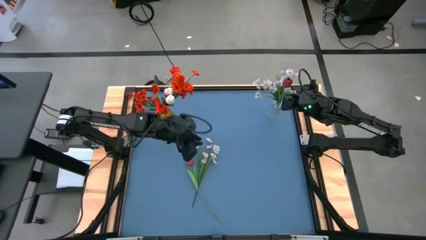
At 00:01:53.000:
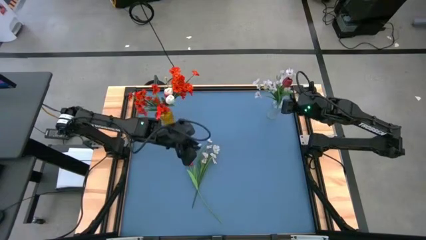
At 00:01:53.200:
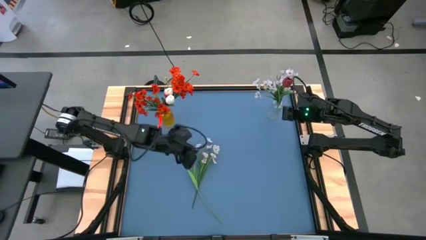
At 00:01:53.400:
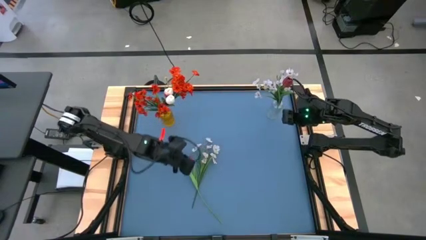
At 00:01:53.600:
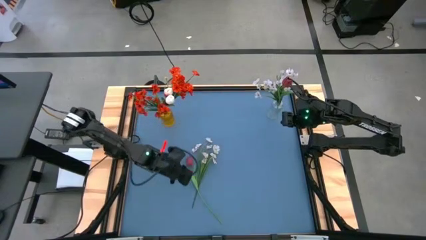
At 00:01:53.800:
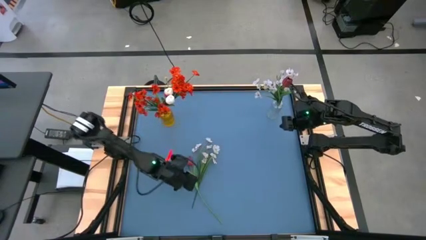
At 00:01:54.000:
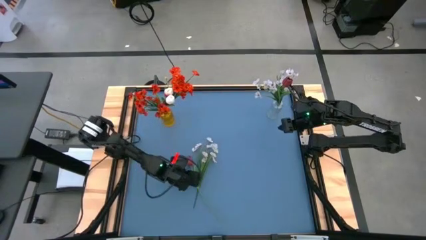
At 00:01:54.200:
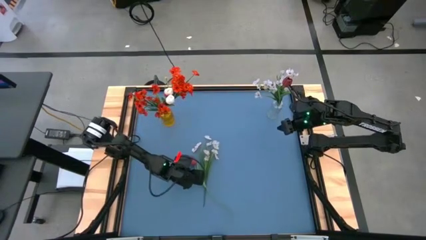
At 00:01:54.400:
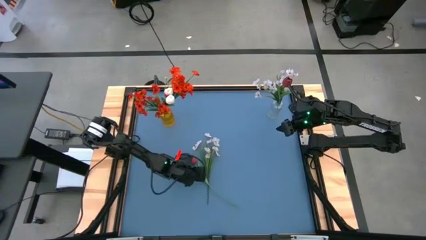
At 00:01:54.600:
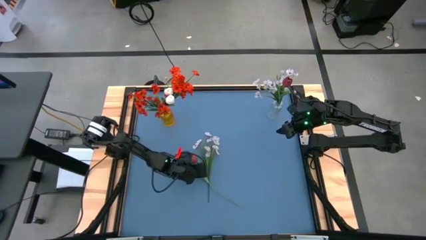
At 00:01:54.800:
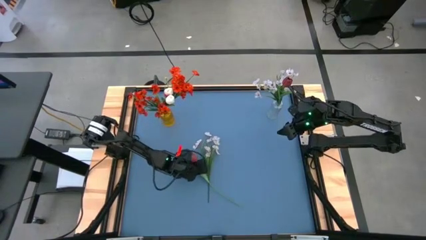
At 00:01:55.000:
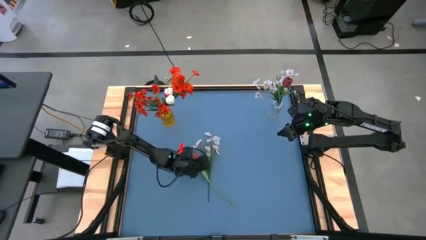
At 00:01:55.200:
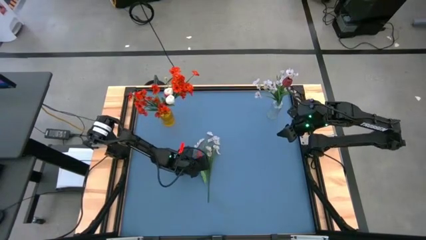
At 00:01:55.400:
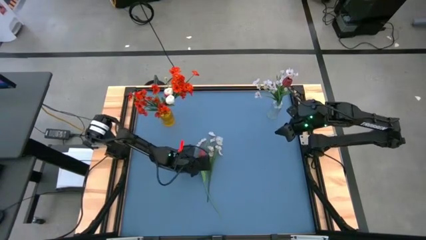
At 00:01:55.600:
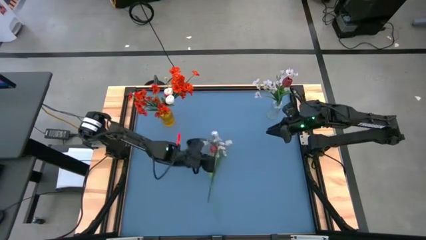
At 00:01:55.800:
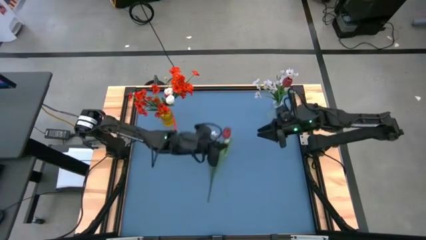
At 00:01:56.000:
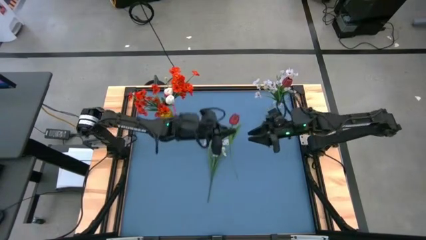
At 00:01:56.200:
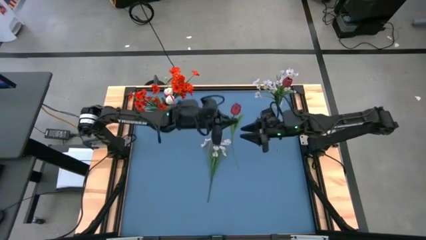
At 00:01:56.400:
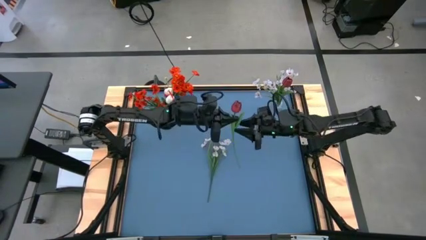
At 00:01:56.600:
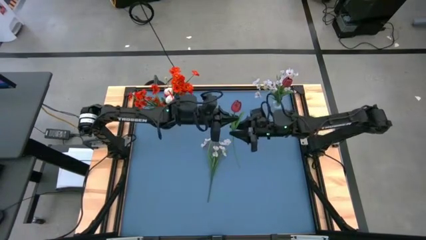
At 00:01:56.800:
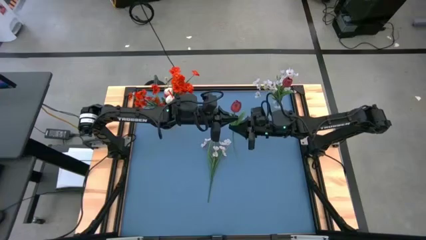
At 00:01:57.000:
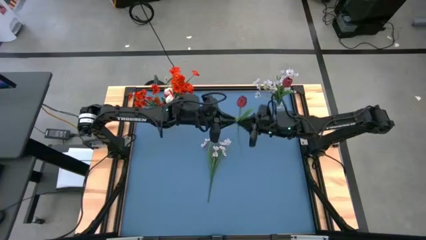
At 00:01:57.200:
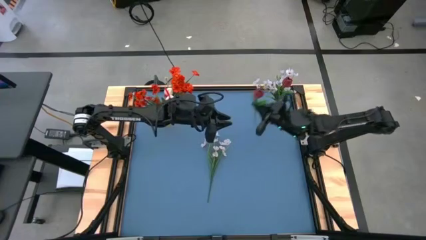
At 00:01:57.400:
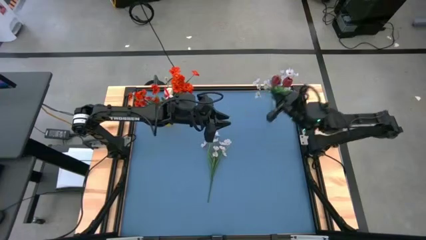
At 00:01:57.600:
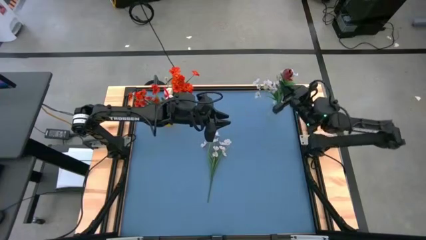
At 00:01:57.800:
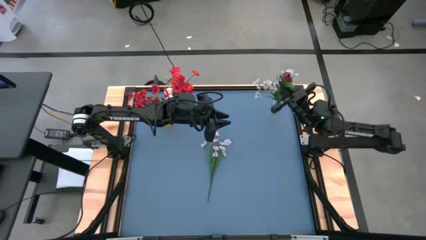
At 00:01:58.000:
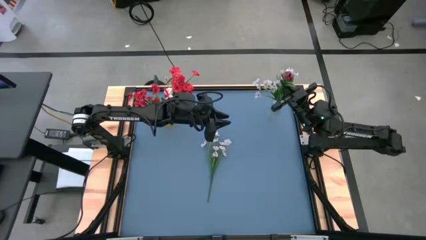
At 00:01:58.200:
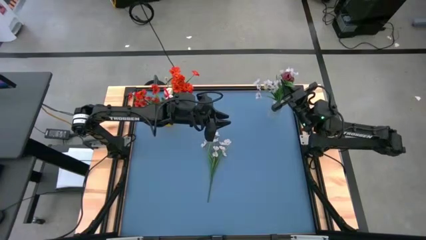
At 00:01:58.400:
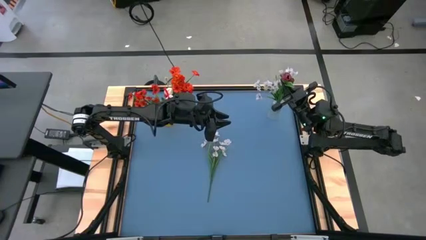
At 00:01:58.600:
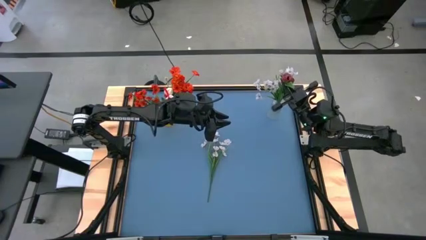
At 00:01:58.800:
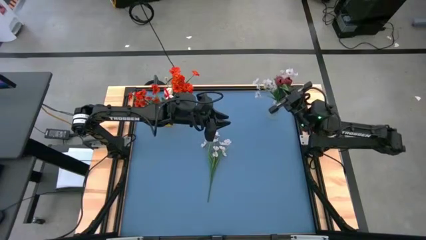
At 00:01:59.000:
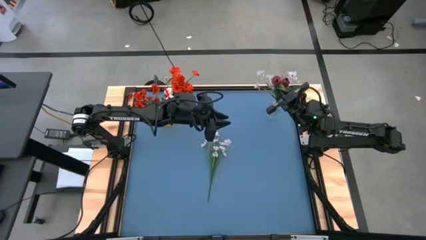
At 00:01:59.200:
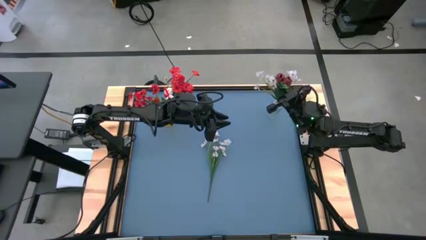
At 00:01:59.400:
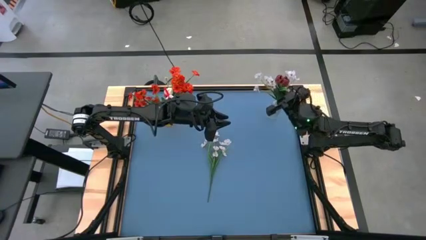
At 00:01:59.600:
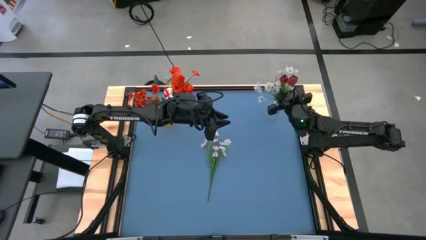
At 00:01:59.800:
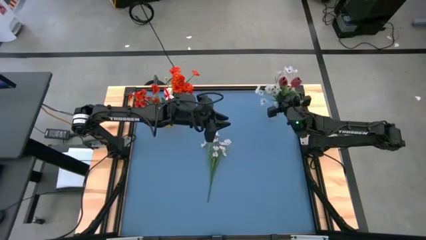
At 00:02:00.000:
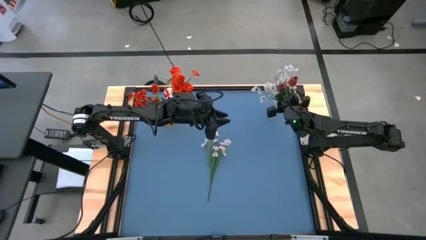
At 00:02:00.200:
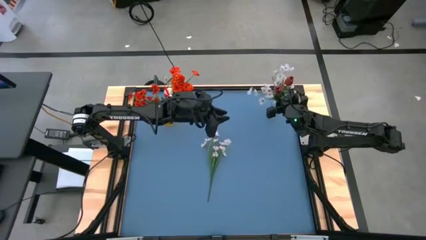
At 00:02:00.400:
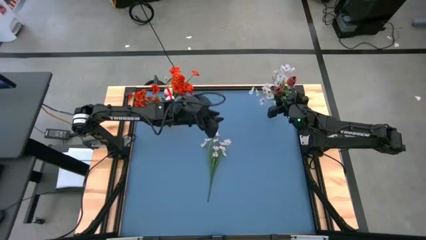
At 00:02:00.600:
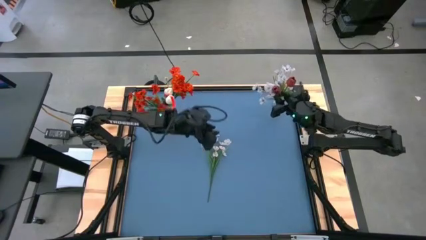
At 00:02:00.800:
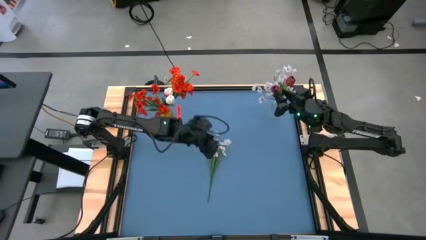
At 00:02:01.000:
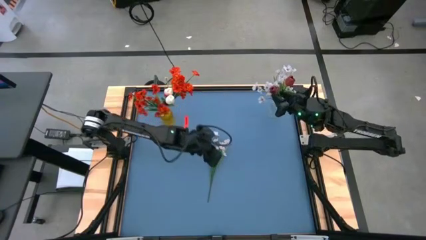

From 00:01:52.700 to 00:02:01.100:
Task: Sort flowers into vase by color
Put the red flowers into the transparent flower vase

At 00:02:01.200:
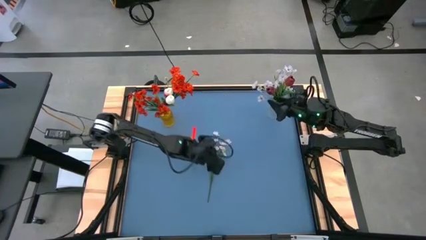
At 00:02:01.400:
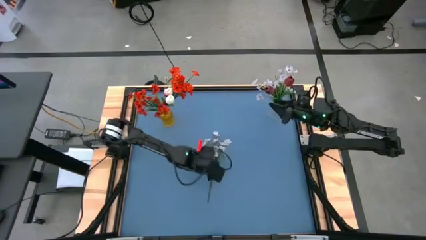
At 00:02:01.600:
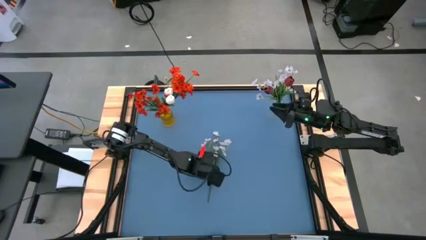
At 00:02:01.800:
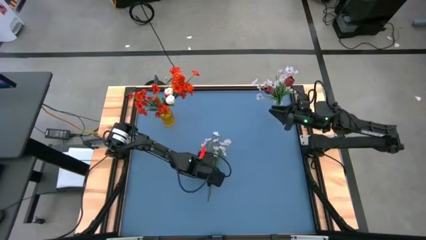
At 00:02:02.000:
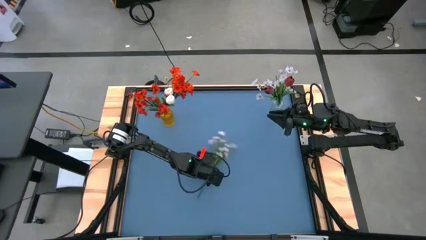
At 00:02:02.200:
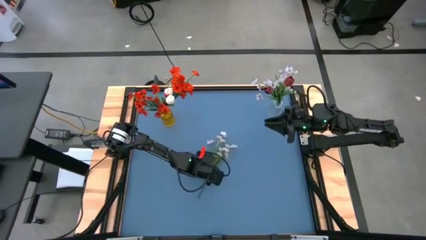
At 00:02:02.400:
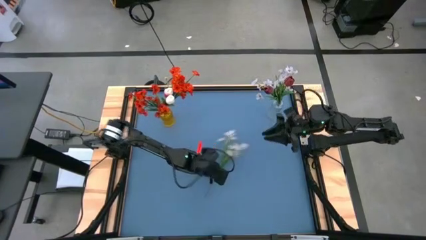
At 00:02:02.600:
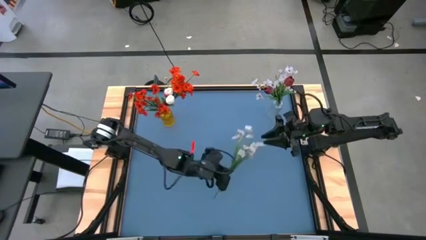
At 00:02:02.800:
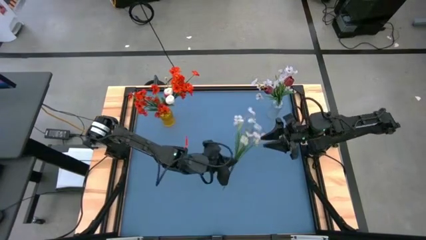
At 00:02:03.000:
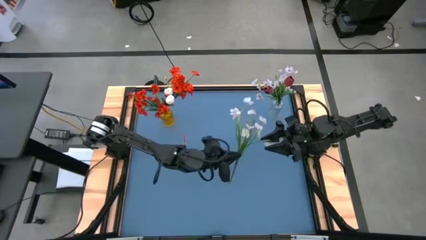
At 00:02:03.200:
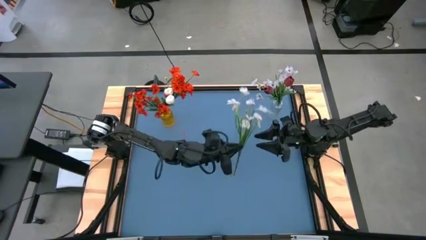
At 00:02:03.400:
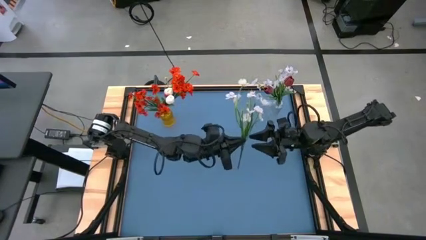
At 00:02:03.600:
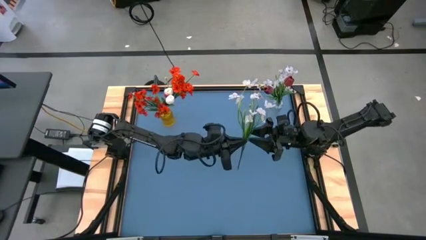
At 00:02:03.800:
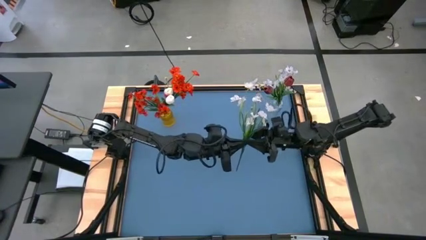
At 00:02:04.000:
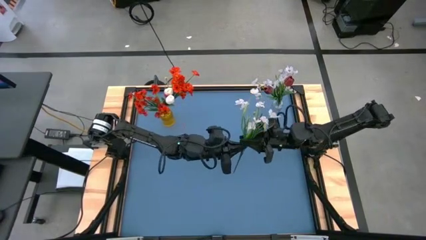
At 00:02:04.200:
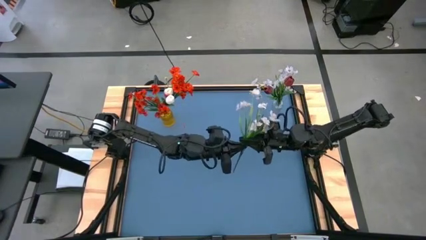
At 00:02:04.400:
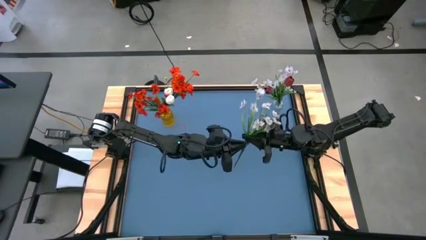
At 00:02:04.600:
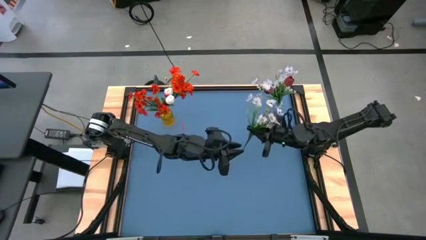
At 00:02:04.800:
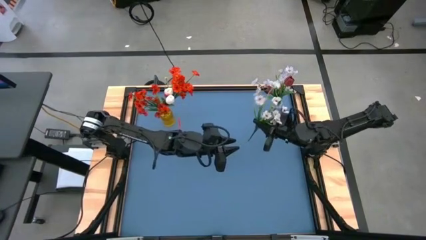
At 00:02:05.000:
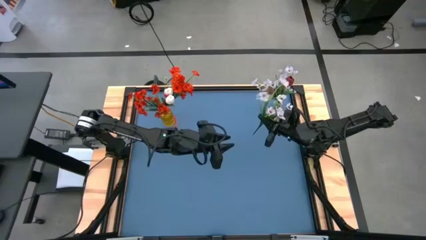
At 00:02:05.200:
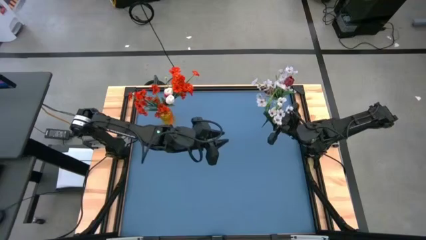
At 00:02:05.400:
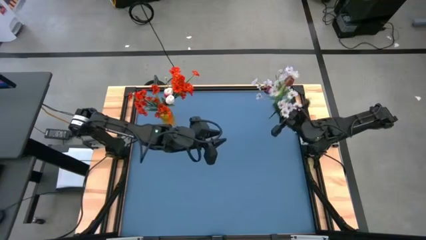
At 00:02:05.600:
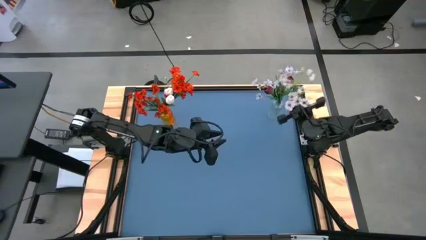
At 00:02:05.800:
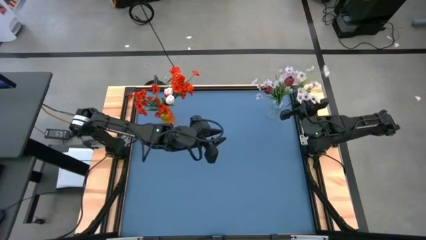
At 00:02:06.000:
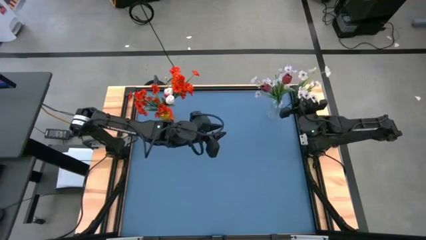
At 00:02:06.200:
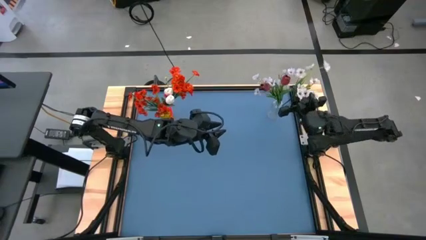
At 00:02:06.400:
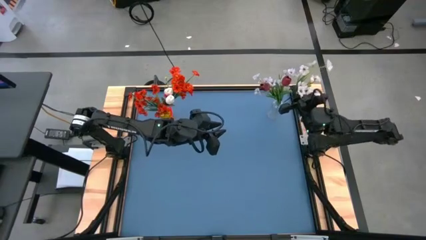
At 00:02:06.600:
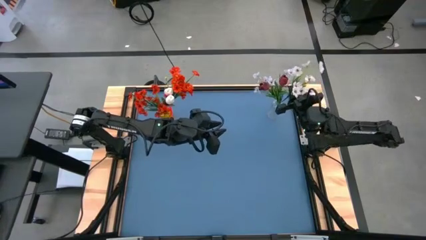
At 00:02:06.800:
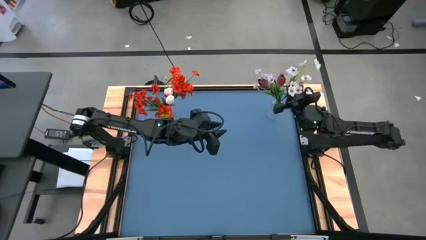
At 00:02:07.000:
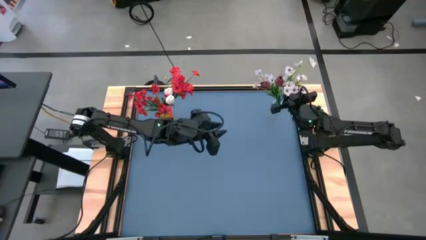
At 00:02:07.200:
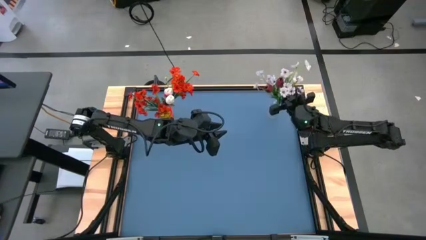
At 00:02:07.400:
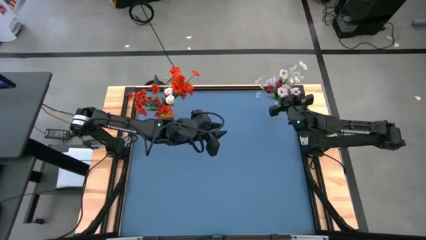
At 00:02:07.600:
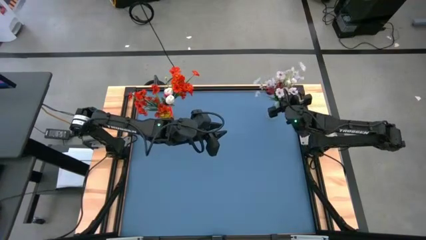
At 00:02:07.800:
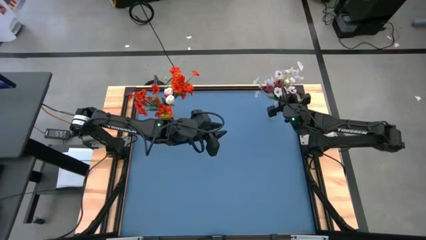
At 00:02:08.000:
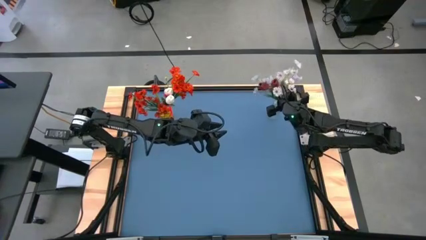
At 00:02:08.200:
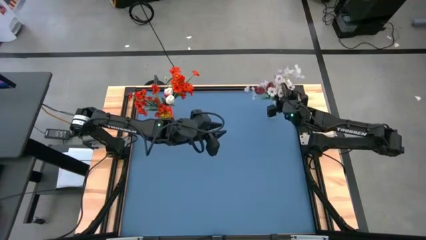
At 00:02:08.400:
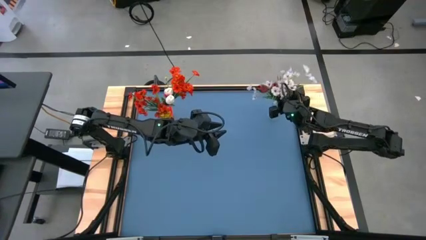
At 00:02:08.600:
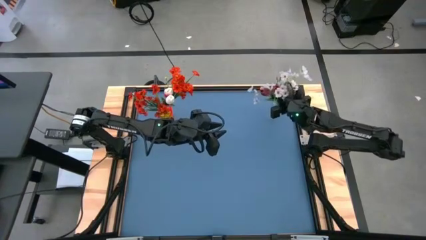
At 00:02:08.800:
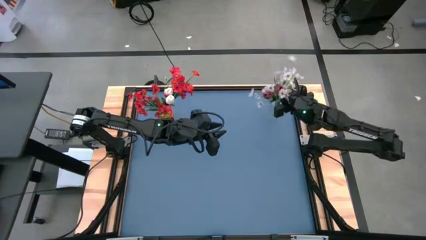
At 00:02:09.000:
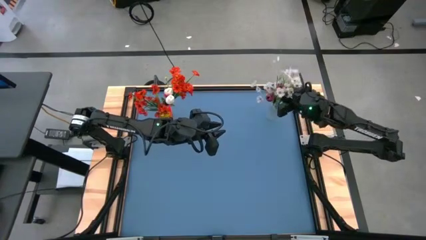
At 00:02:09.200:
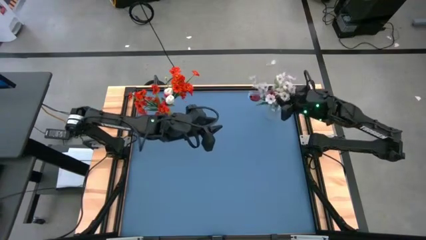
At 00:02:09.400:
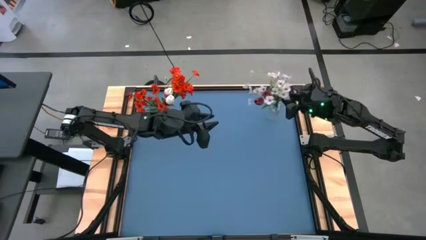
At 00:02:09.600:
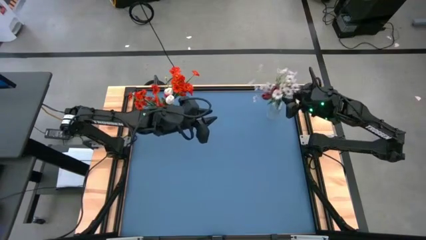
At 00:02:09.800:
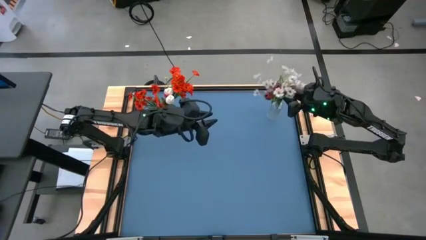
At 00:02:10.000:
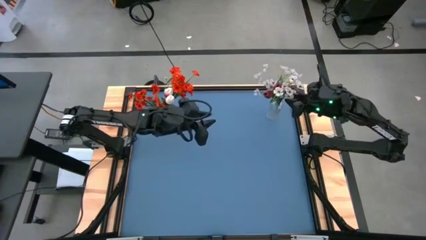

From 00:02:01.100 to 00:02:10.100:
Put the white flowers into the transparent flower vase
